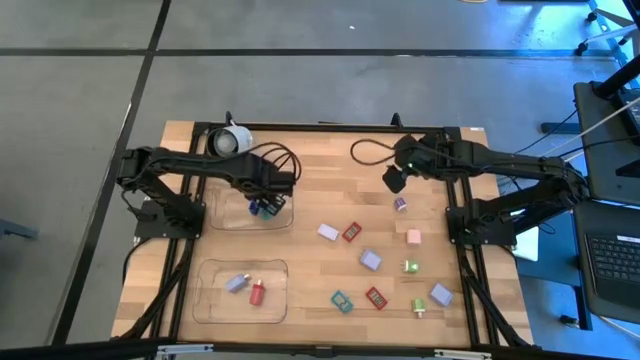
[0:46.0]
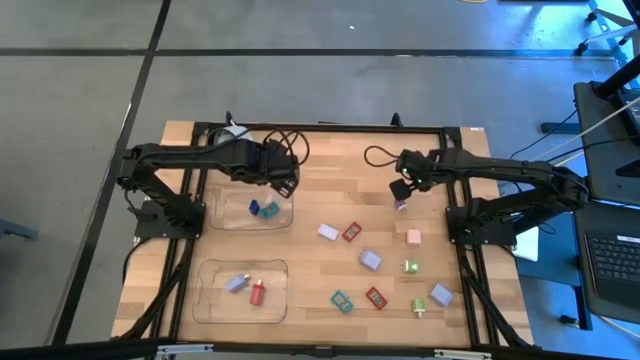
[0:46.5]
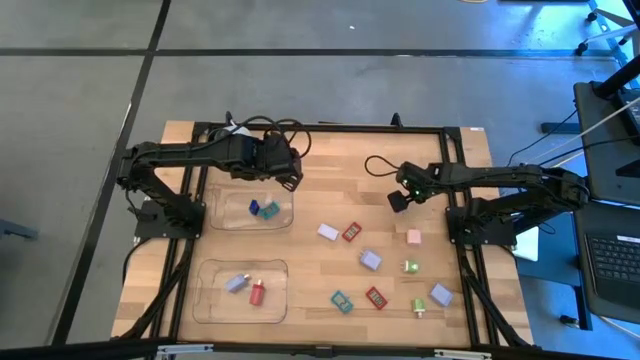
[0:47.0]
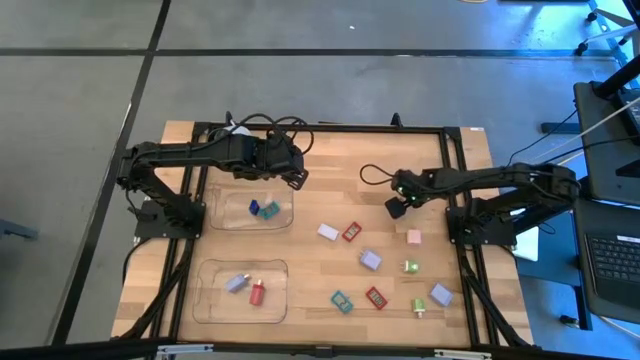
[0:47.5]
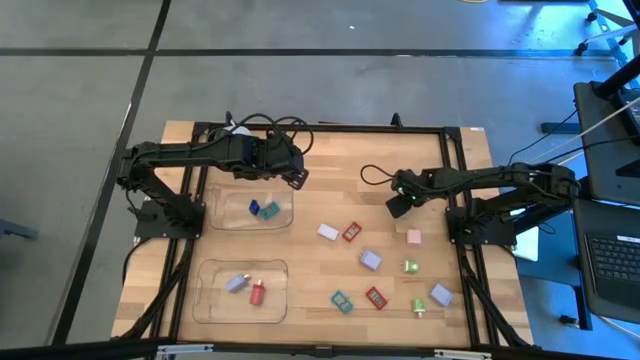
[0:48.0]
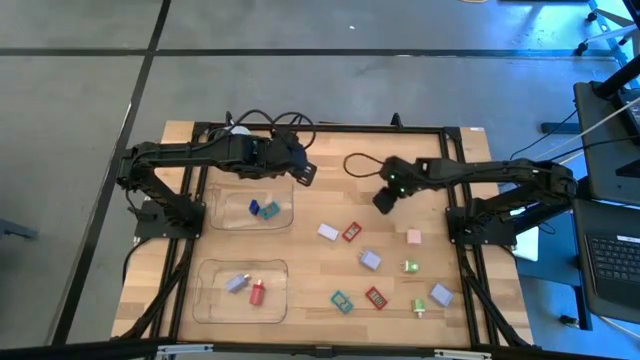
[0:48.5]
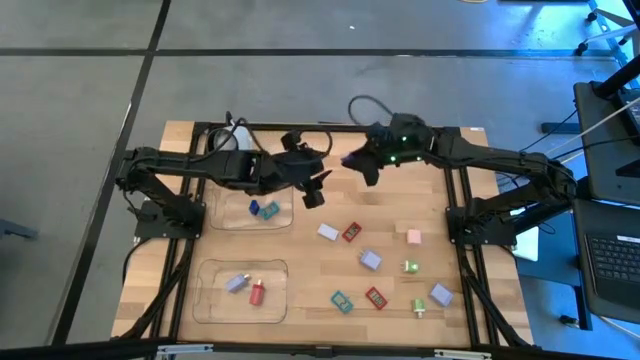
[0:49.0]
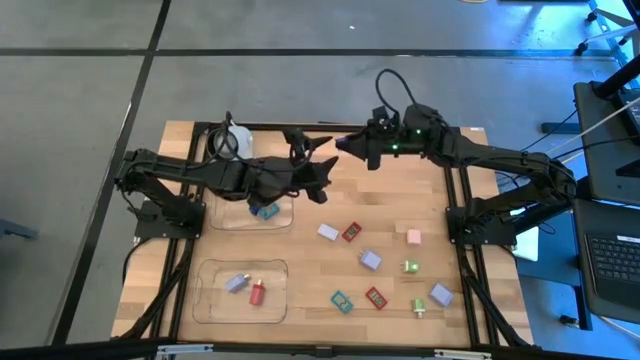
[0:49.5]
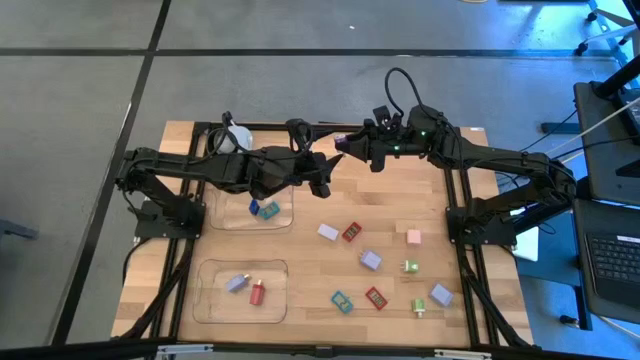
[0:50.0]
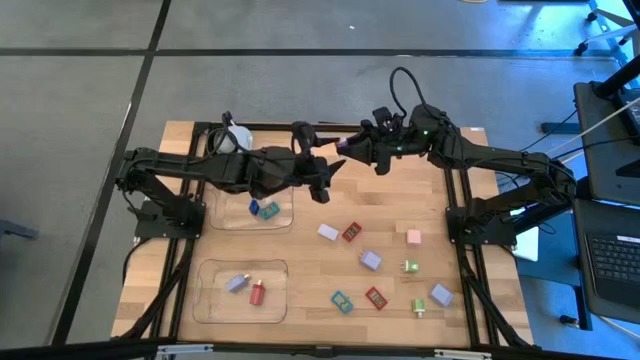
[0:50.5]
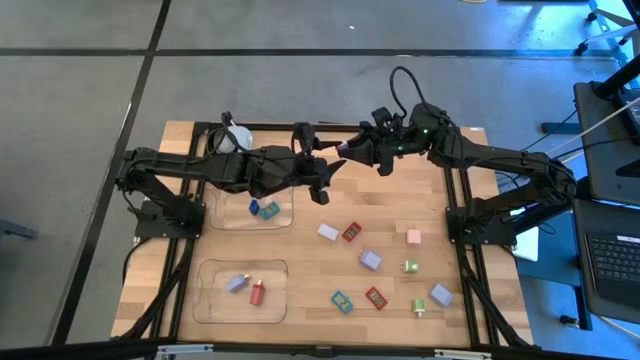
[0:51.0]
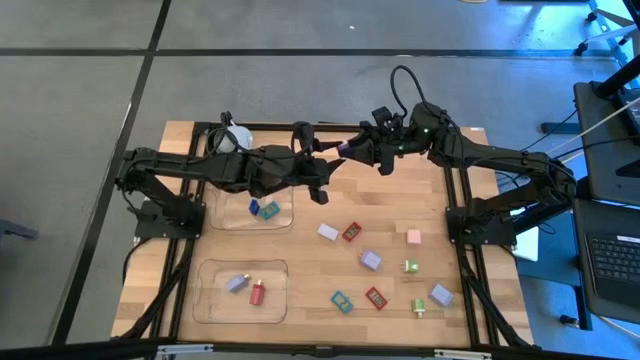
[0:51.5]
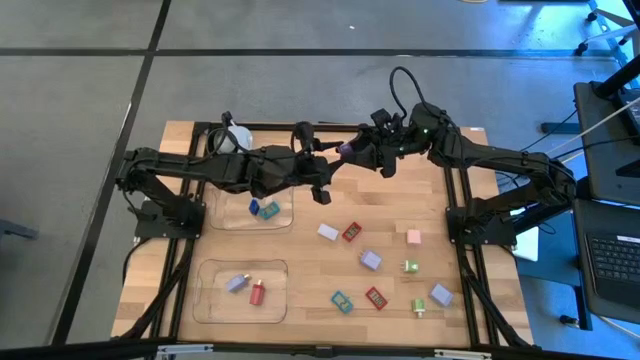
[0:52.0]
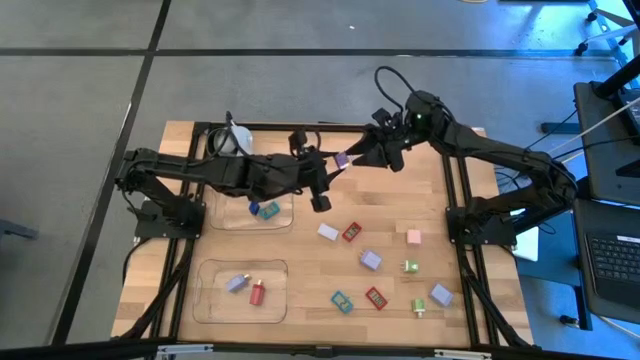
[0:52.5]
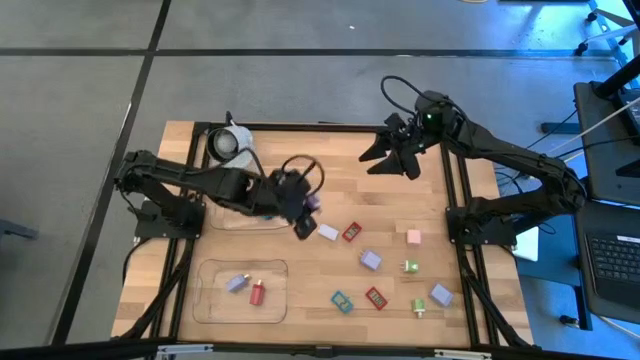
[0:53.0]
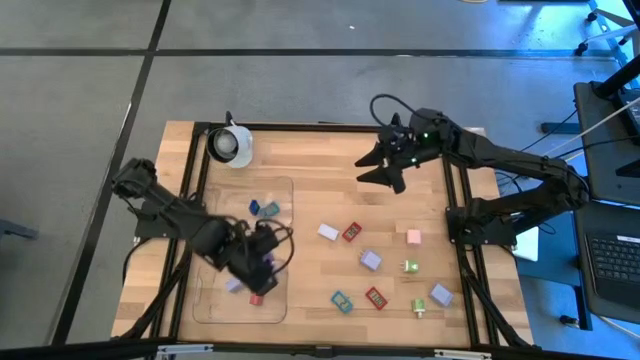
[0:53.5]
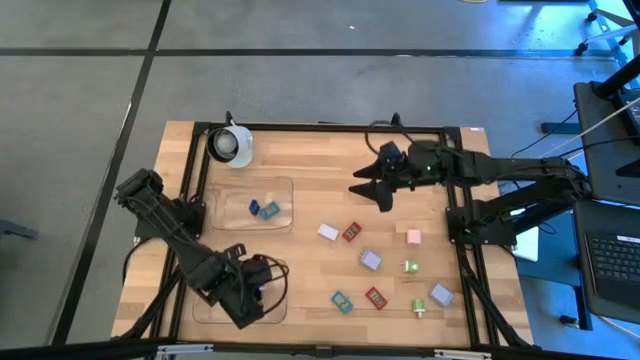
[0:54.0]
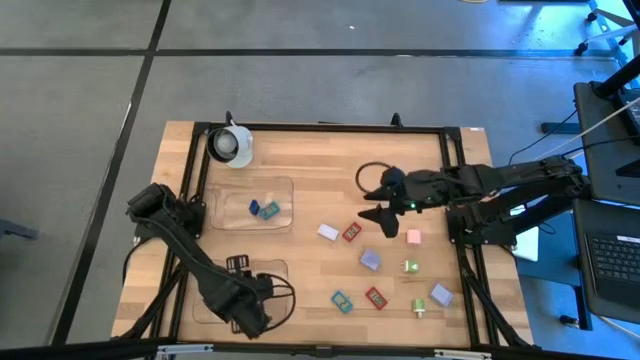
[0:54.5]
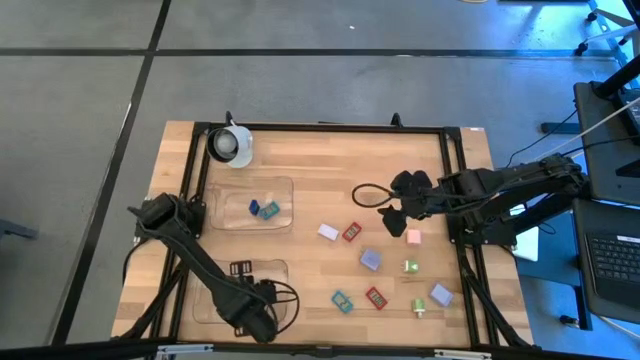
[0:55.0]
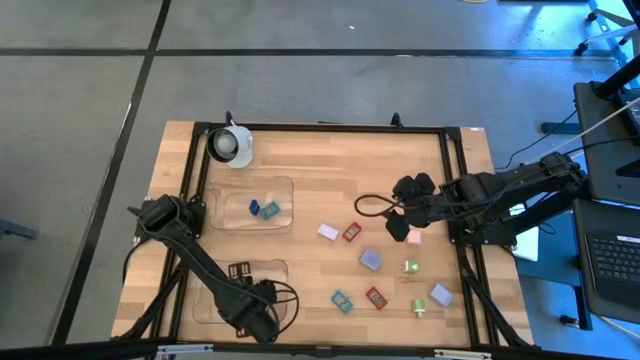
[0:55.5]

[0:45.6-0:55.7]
Task: Pick & Place Office items
Put the purple charger adapter into the bottom transparent bin

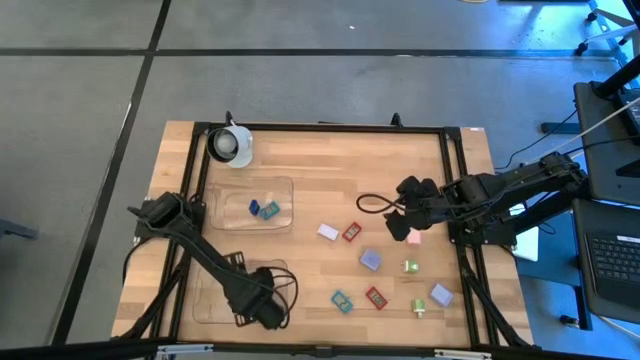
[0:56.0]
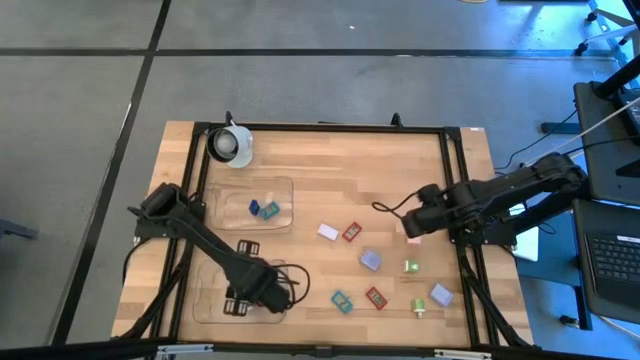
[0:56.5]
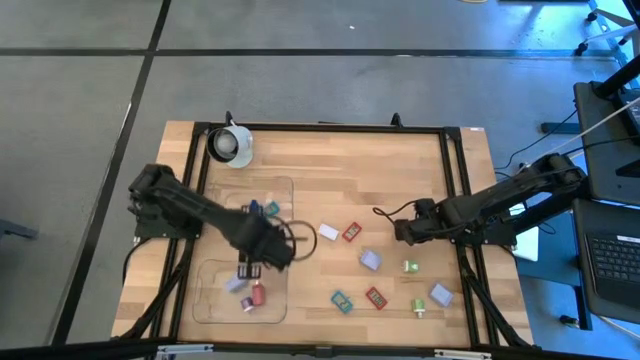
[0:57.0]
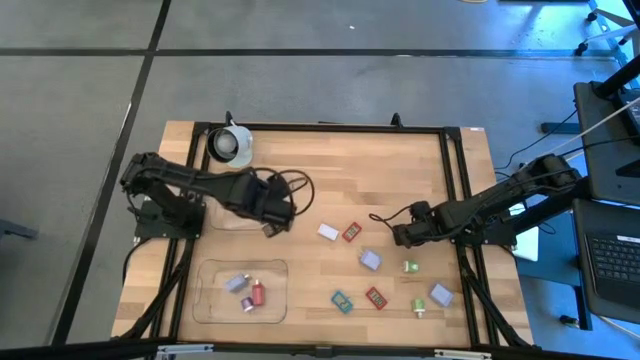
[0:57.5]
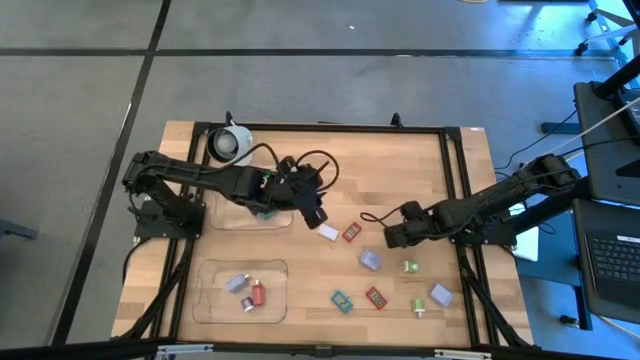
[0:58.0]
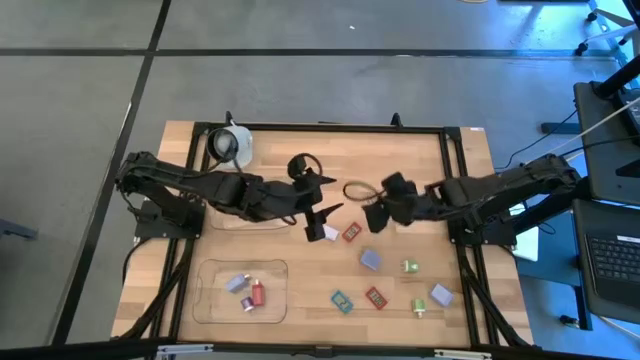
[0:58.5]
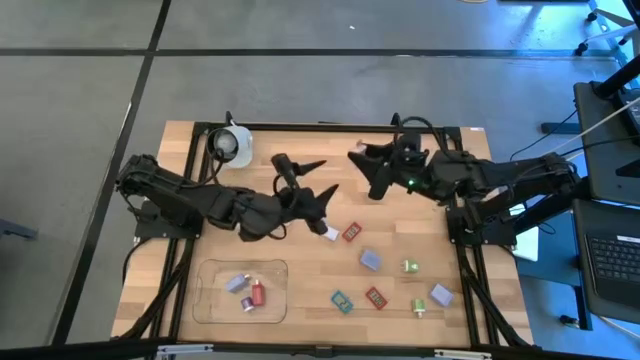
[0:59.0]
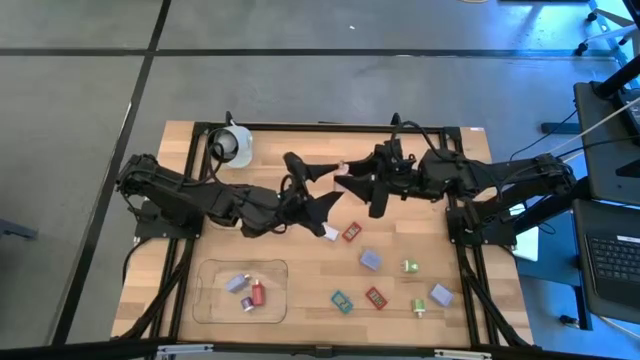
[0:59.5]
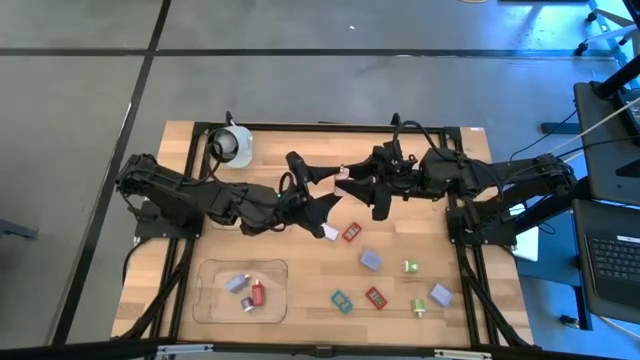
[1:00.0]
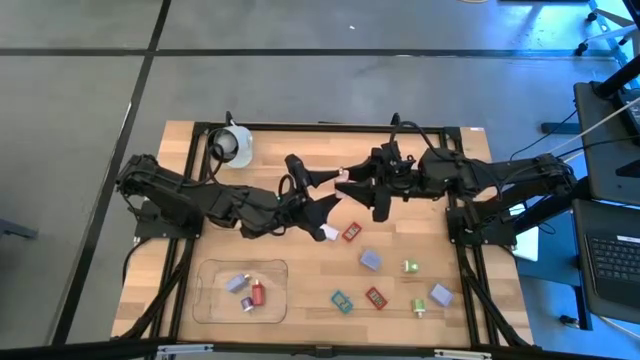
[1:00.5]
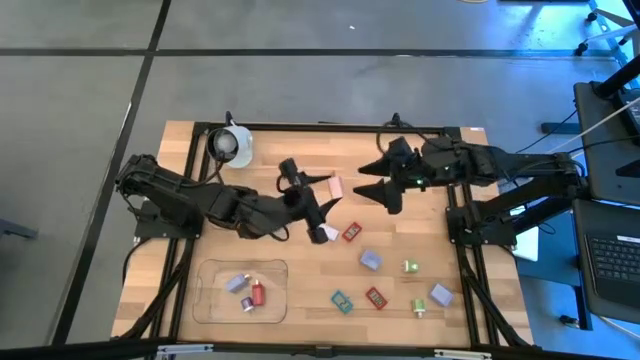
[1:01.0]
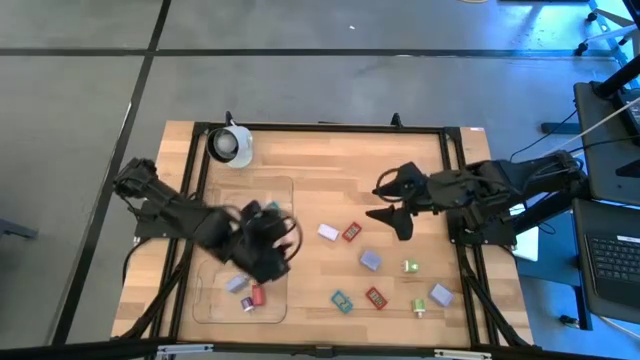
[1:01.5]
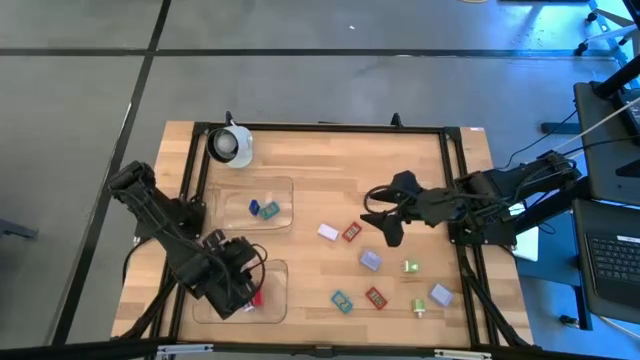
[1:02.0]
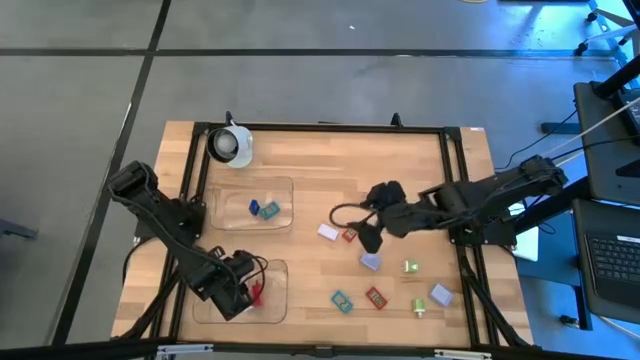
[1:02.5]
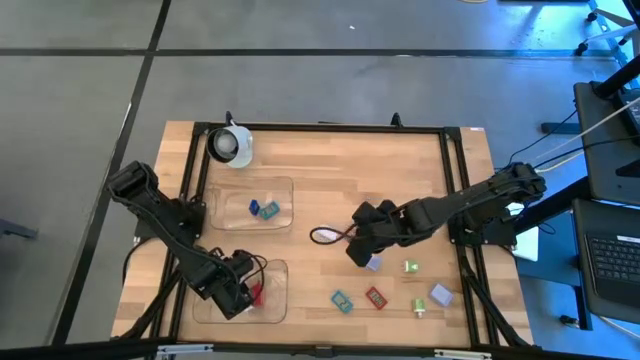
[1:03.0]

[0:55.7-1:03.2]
Put the light pink charger adapter into the bottom transparent bin

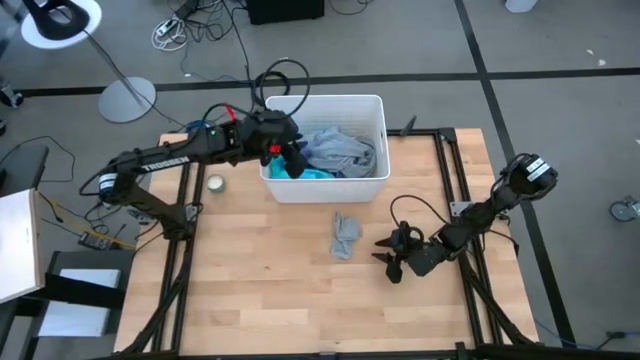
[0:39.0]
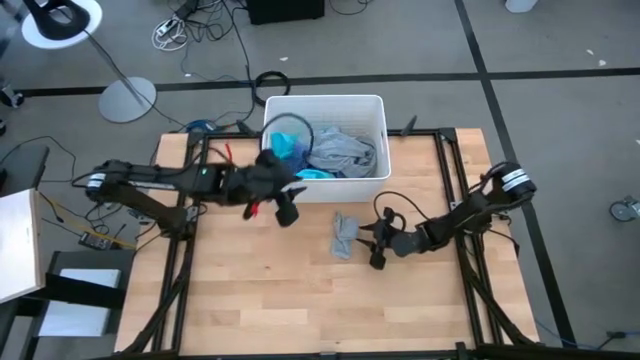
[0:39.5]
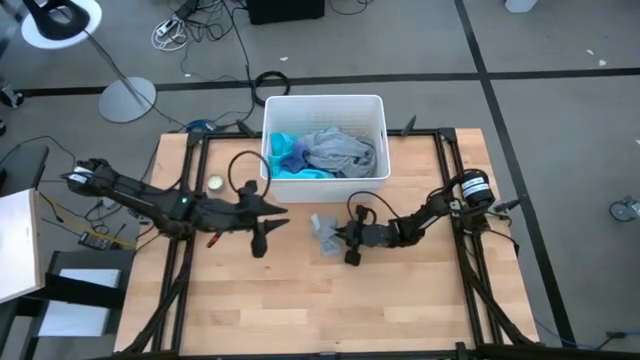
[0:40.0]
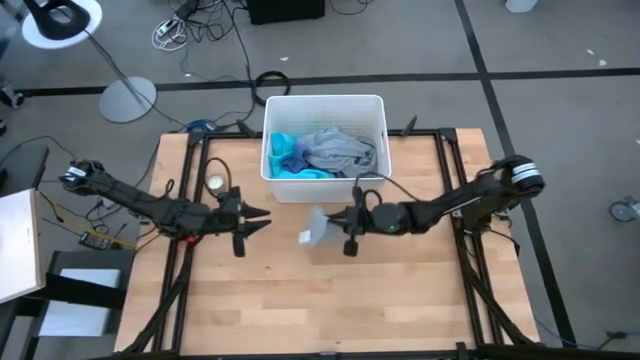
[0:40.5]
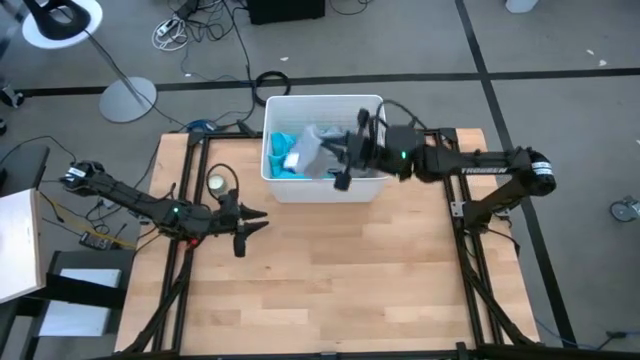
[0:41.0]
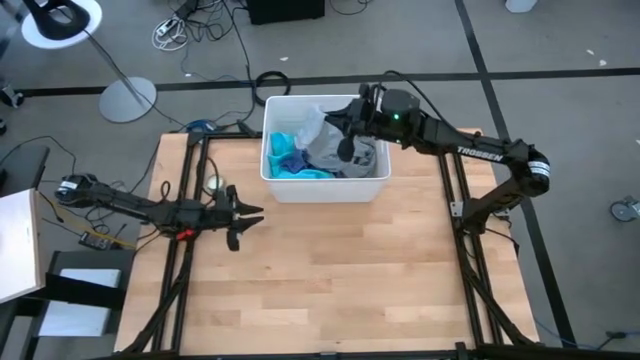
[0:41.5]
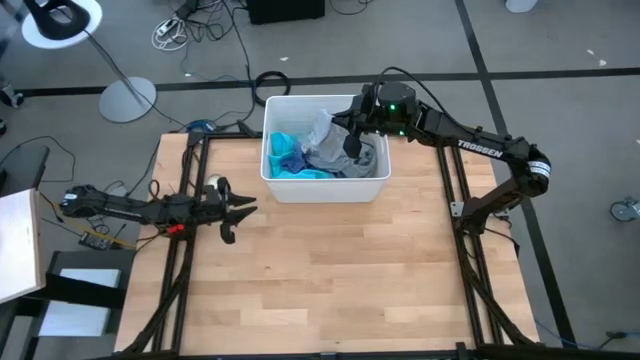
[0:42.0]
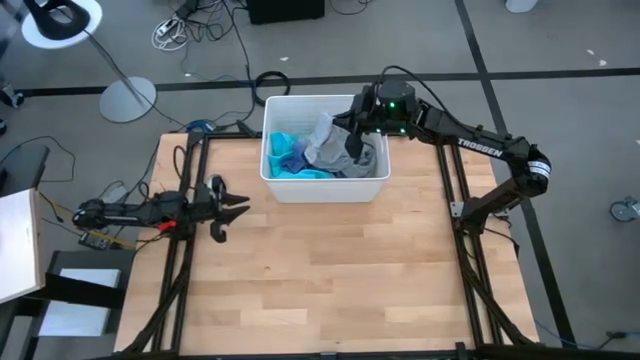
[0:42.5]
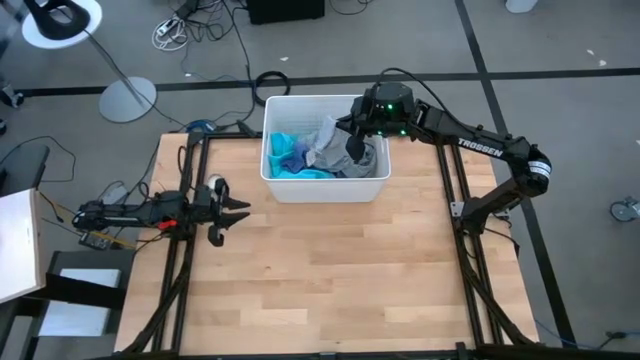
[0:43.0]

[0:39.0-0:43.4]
Task: Sort clothes
Put the gray sock into the laundry bin
